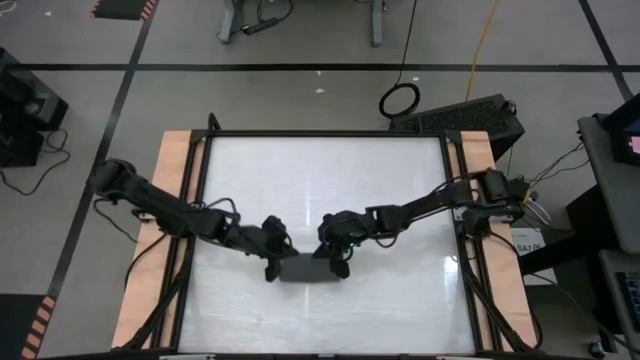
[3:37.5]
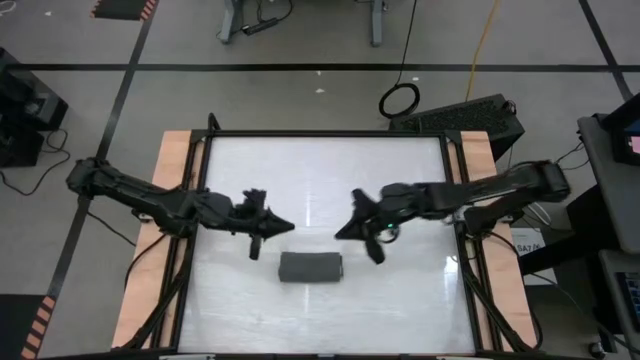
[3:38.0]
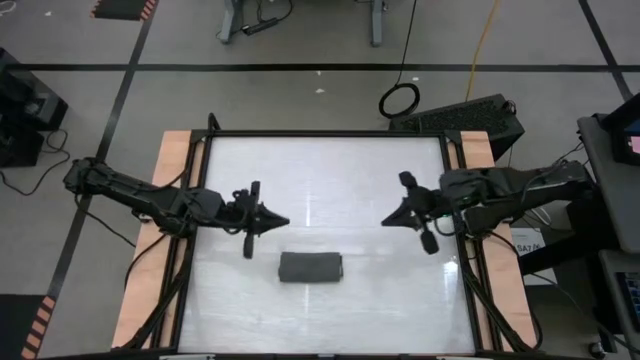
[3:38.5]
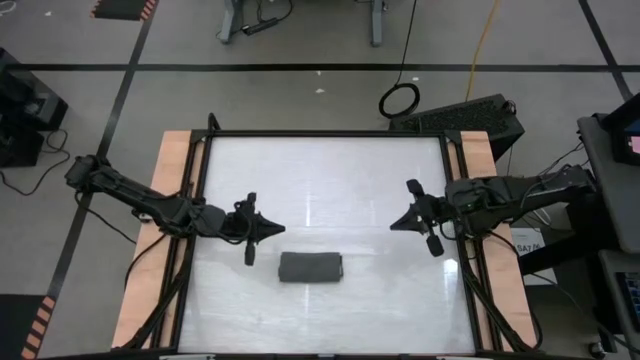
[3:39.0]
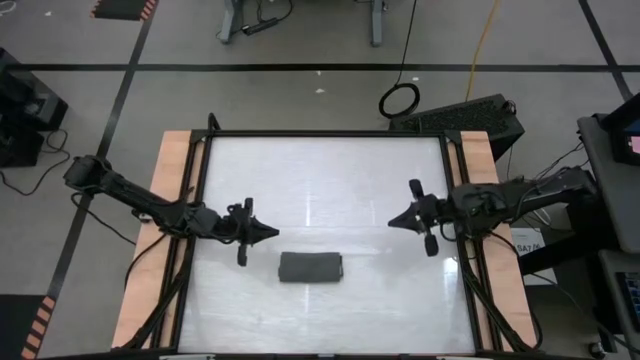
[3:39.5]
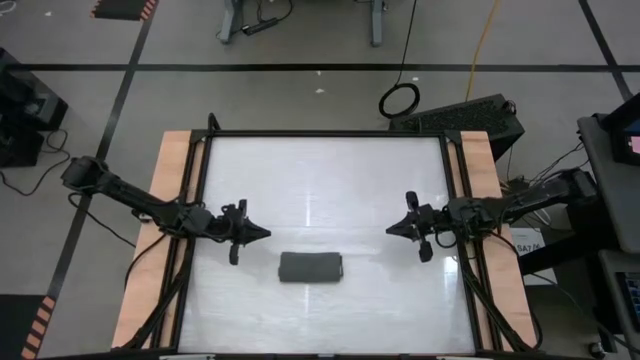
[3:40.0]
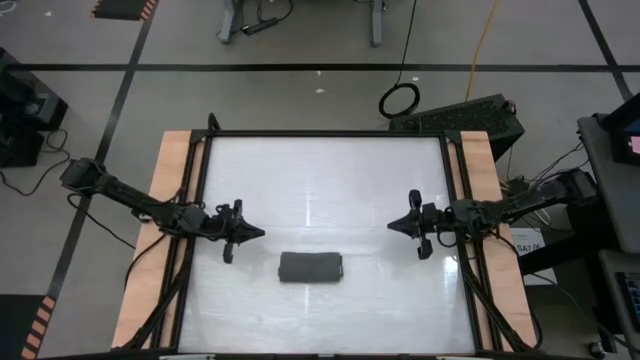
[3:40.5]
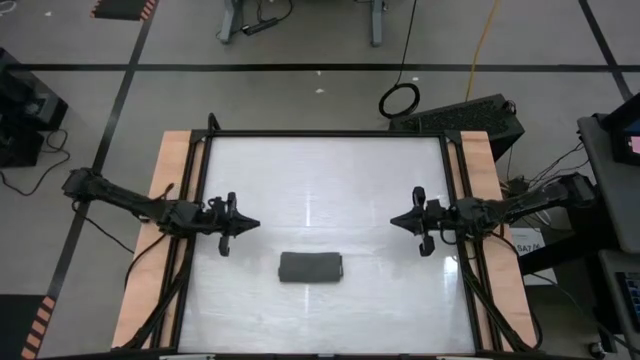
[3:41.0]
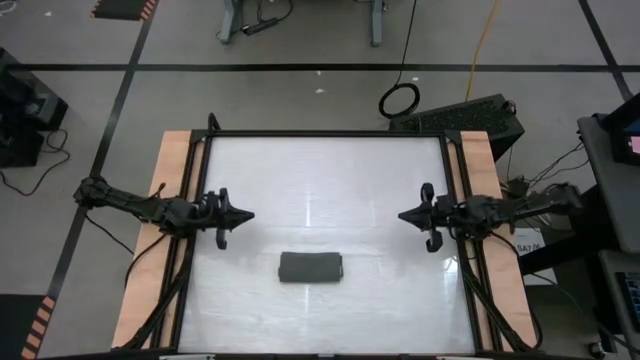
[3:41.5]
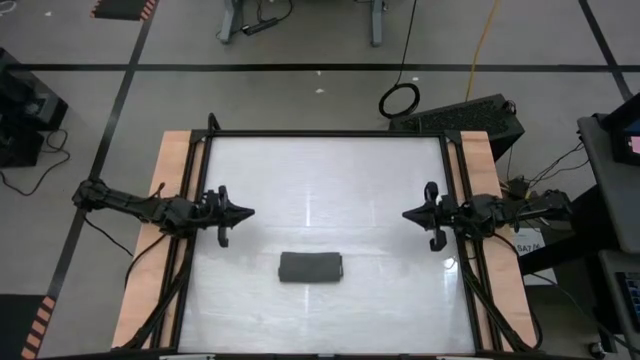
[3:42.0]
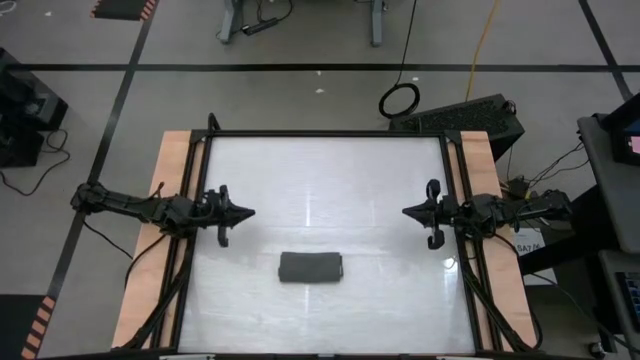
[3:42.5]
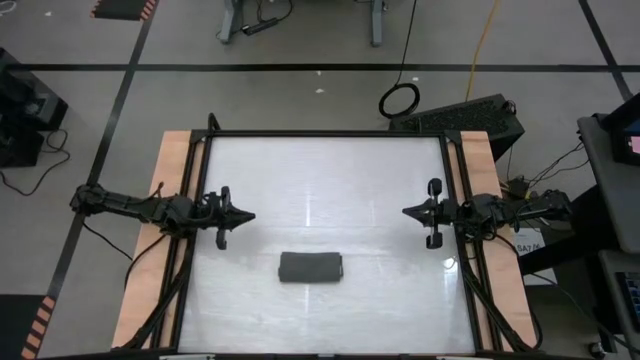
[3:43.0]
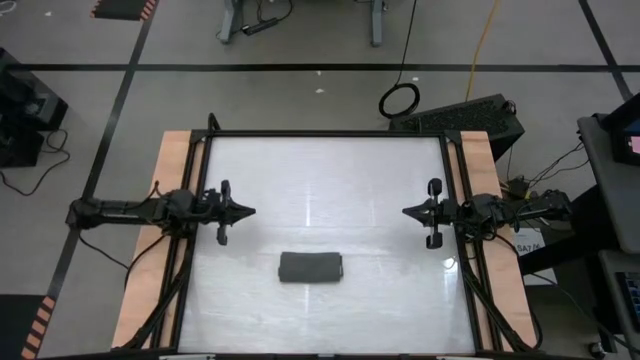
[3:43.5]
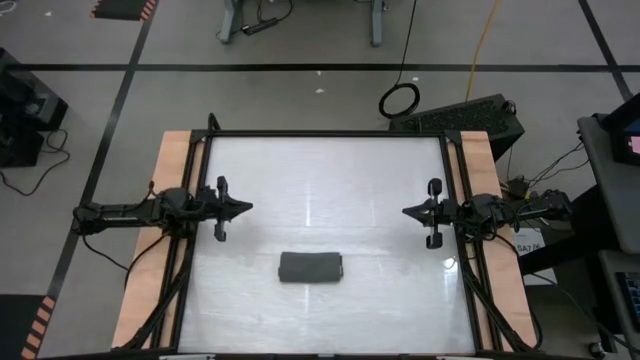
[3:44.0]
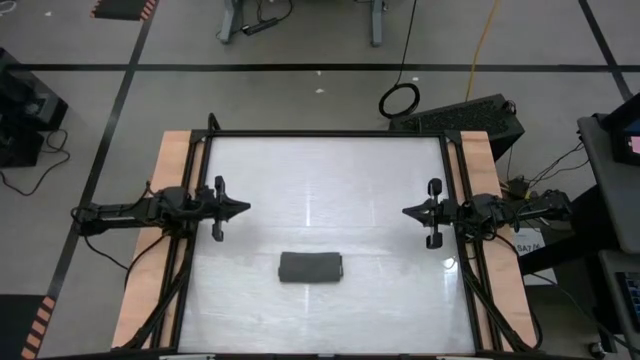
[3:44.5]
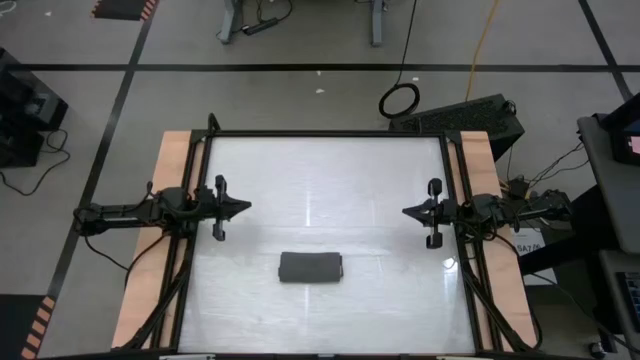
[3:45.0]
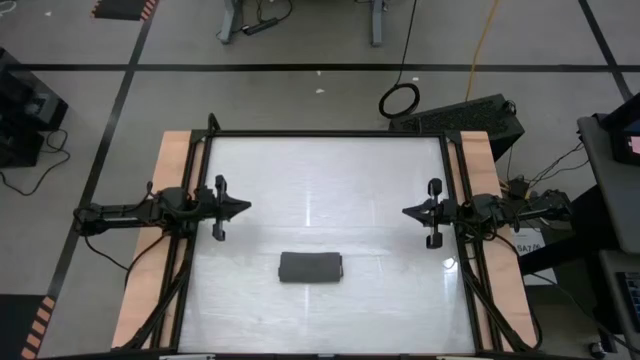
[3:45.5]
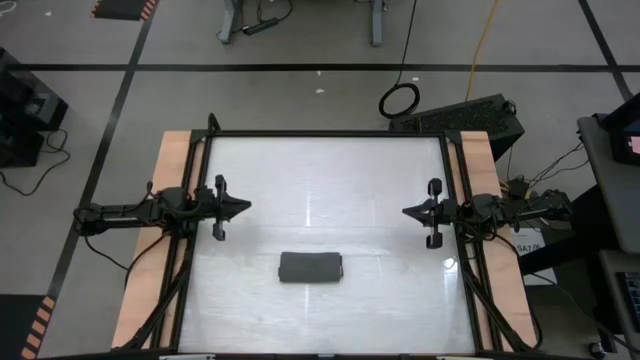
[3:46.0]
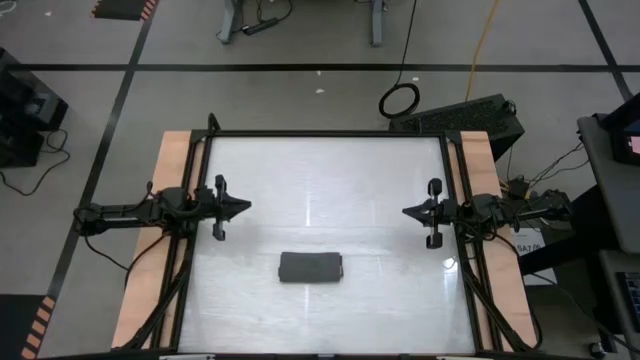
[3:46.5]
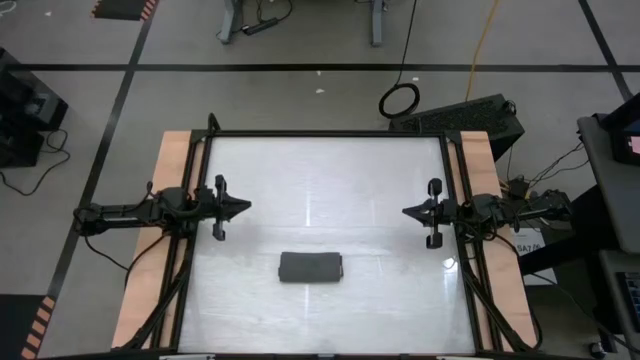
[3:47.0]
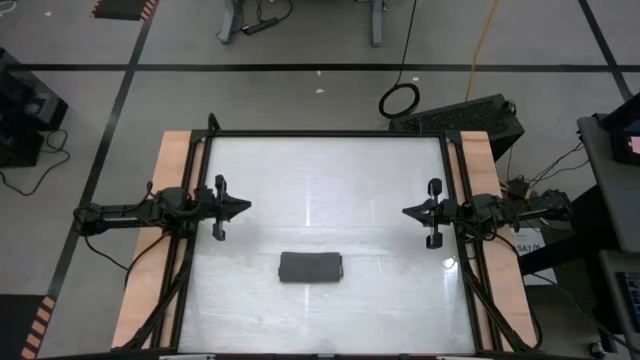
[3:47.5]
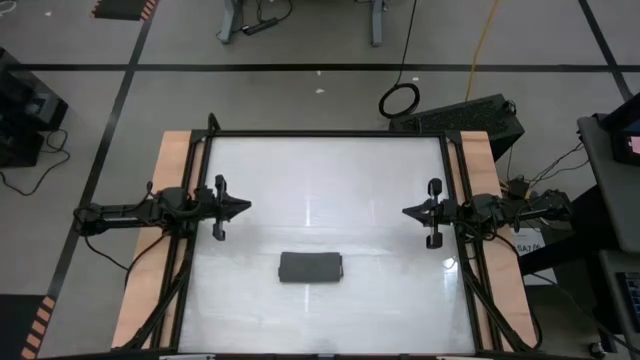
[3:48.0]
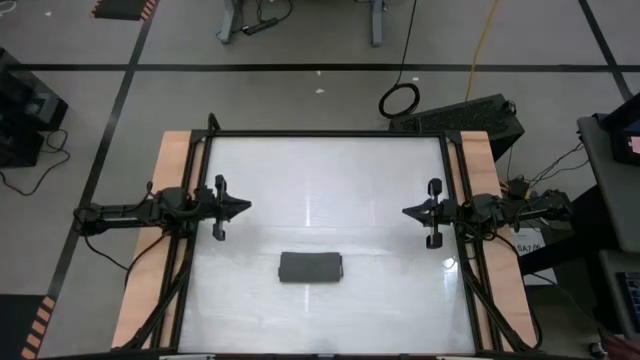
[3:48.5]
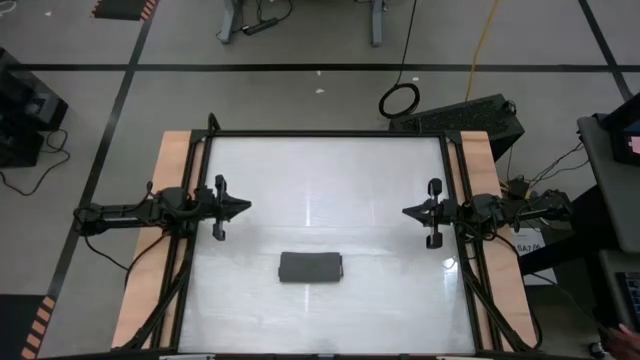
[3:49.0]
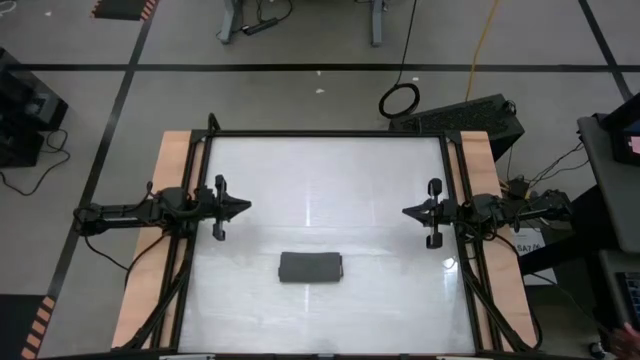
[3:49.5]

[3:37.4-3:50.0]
Task: Roll towel into tight, uniform cylinder
Return to Home Position

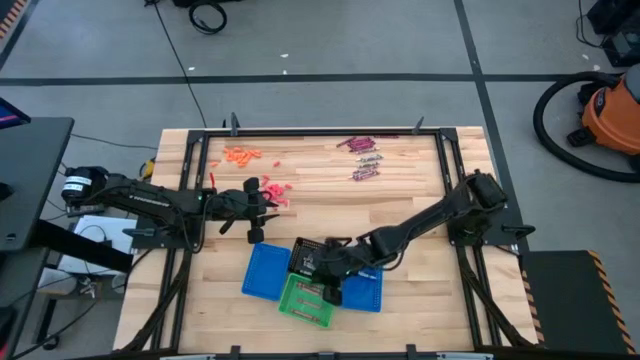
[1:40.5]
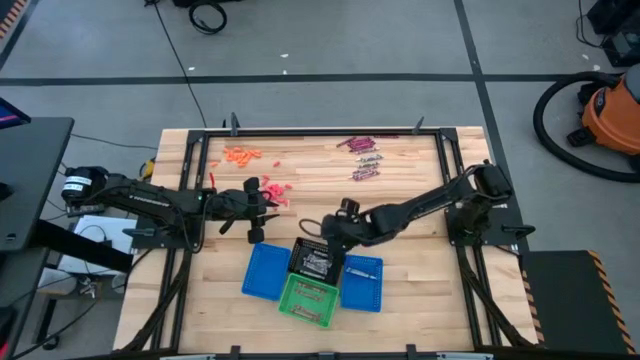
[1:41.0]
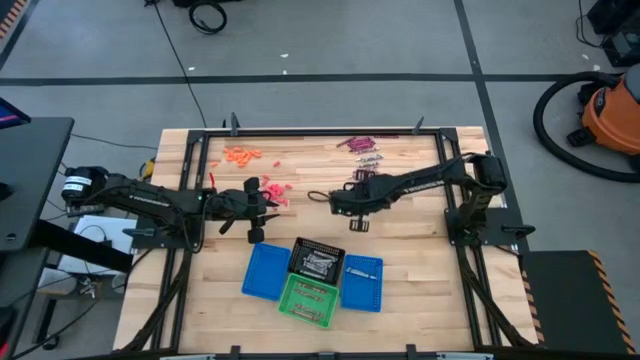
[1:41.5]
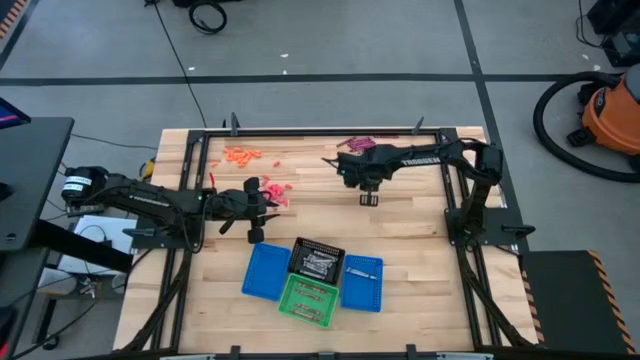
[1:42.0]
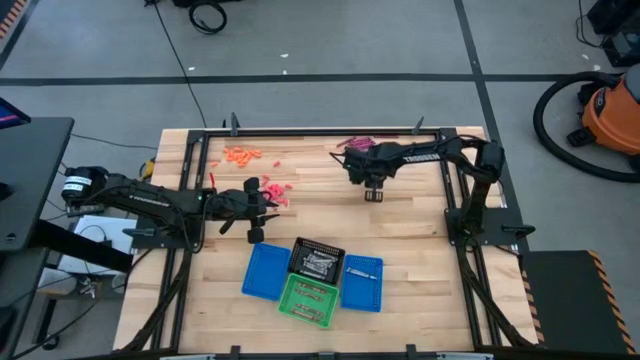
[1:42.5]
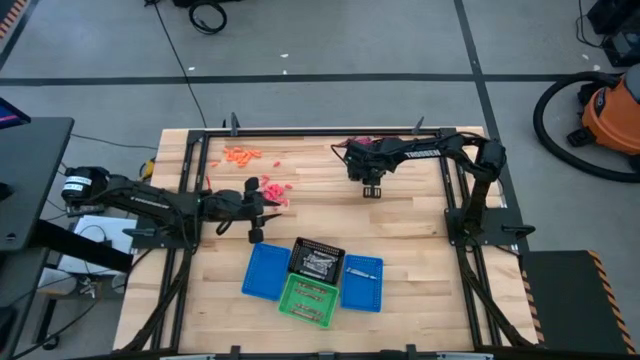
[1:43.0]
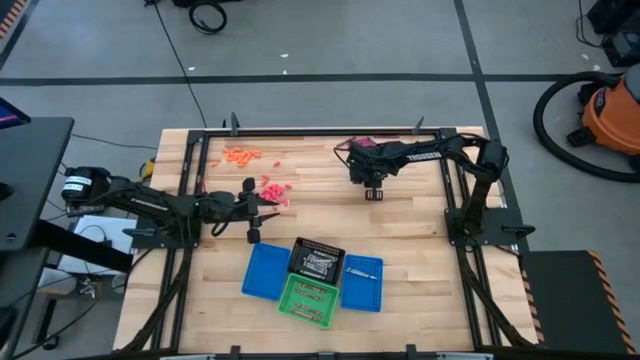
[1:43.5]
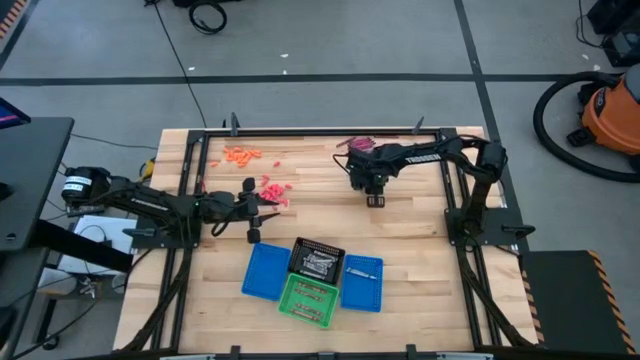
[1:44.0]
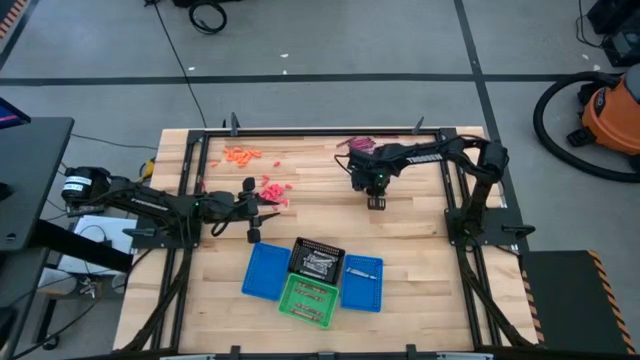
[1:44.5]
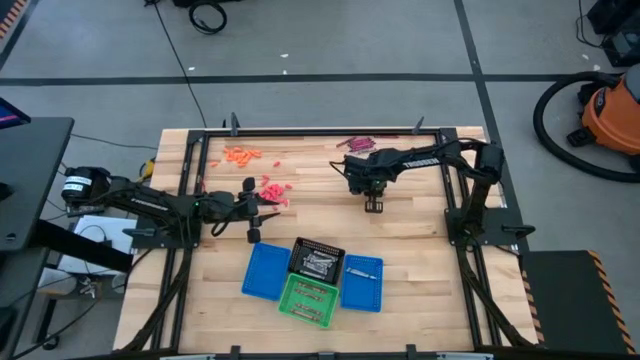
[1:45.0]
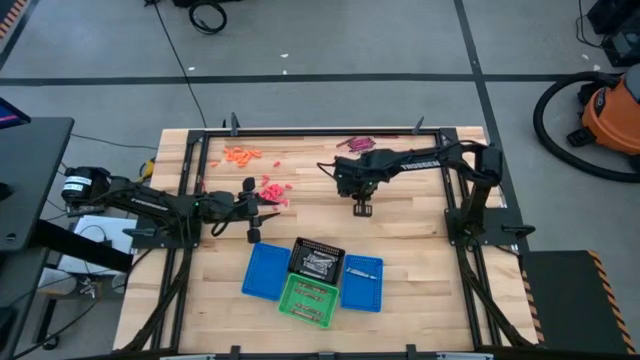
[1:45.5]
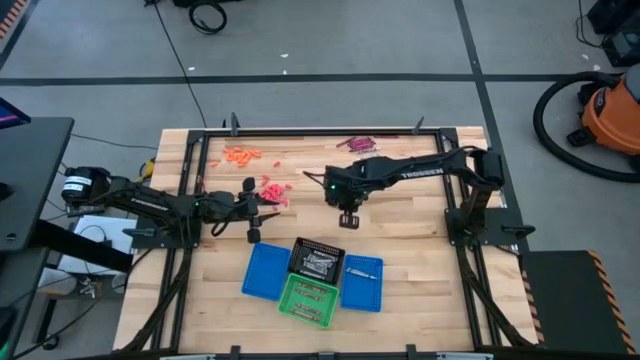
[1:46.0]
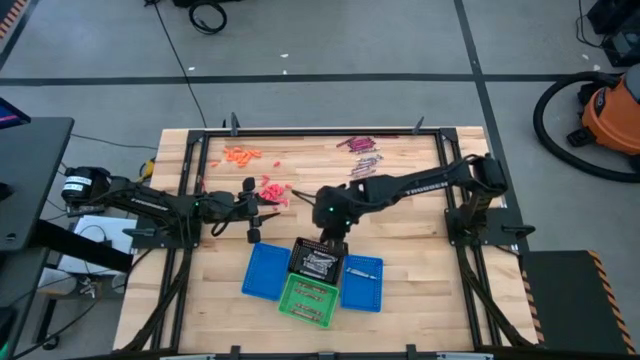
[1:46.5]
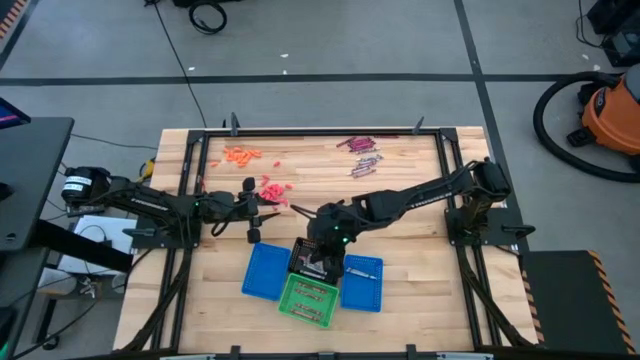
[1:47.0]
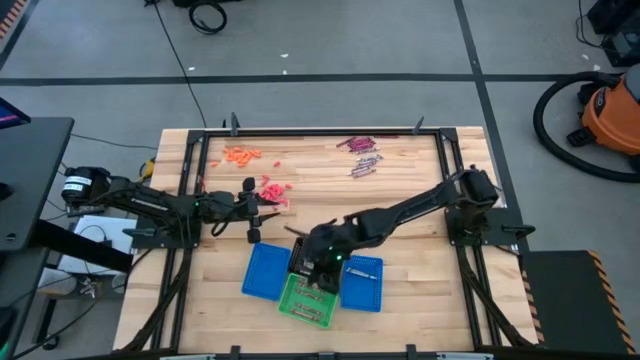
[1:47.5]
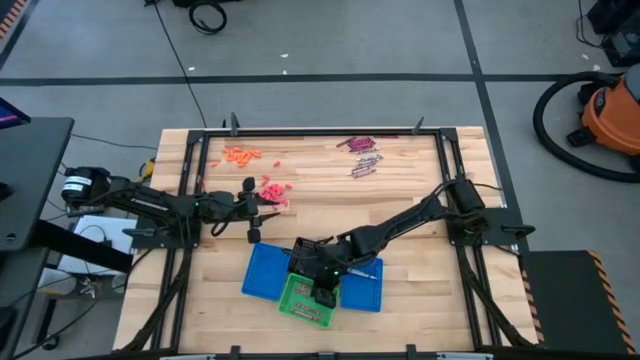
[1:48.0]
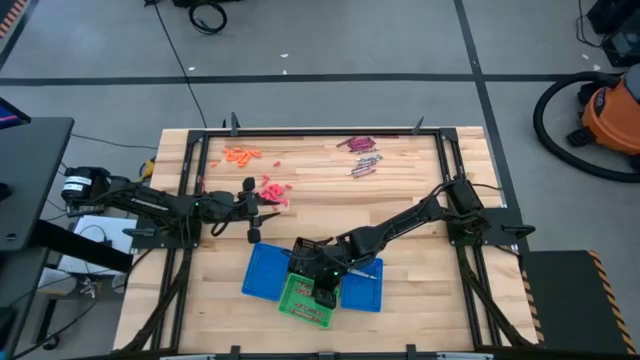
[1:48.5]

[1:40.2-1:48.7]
Task: Sort crayons
Put the pink crayon into the green bin

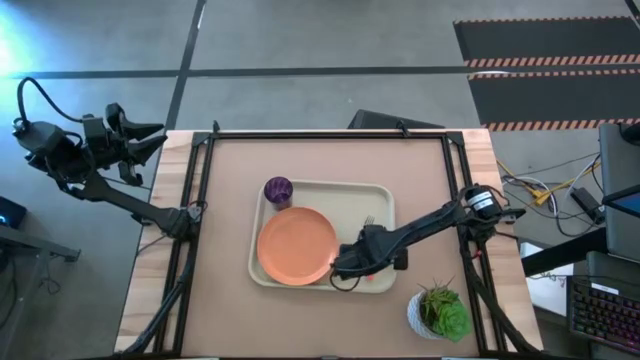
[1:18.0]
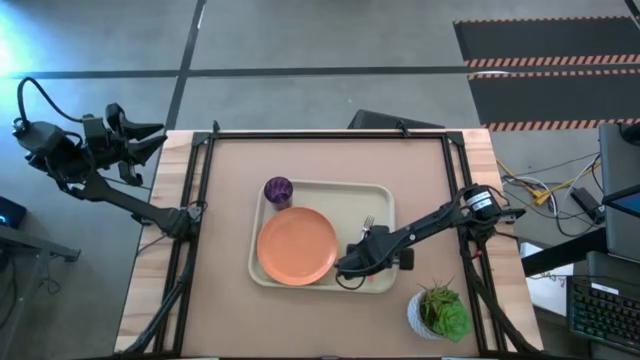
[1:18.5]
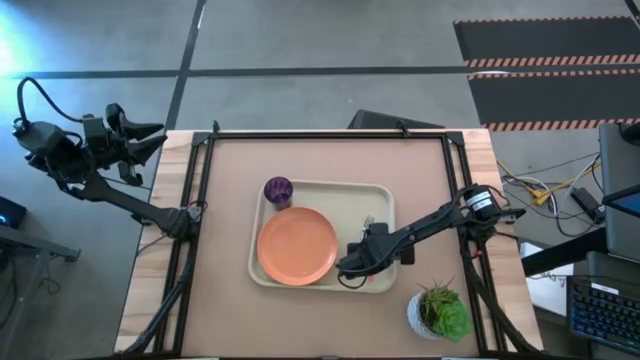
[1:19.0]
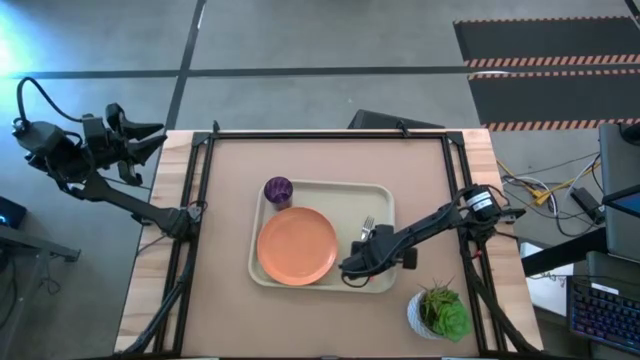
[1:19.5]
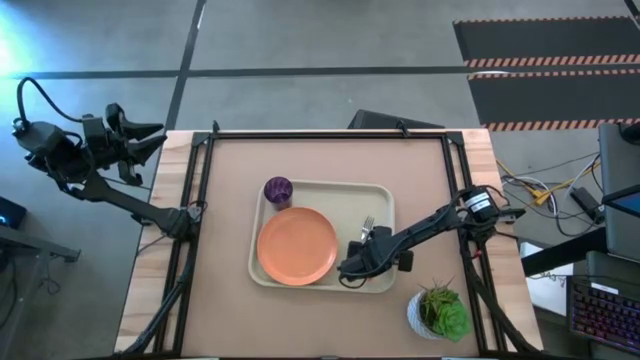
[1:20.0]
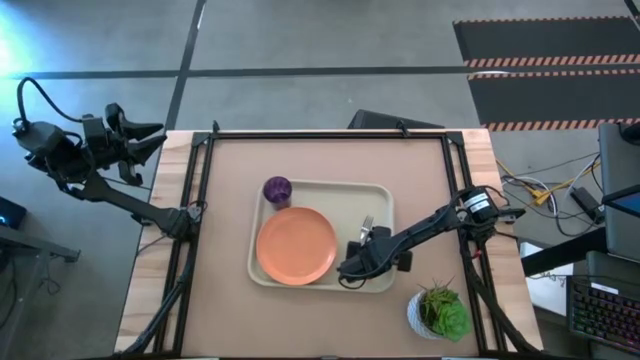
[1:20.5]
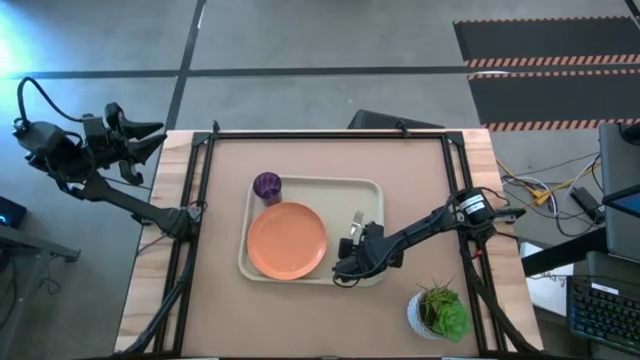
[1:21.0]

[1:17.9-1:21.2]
Task: Pick and place plate/cup/fork/spoon on tray
Adjust the orange spoon
